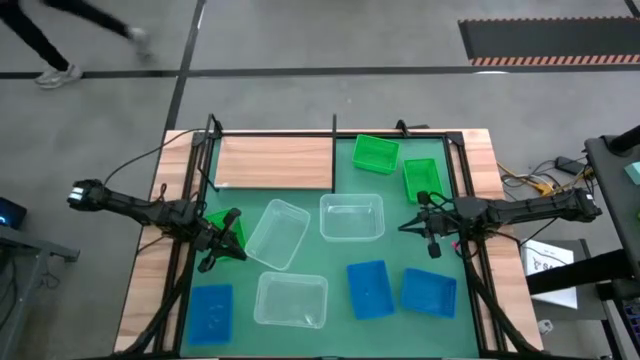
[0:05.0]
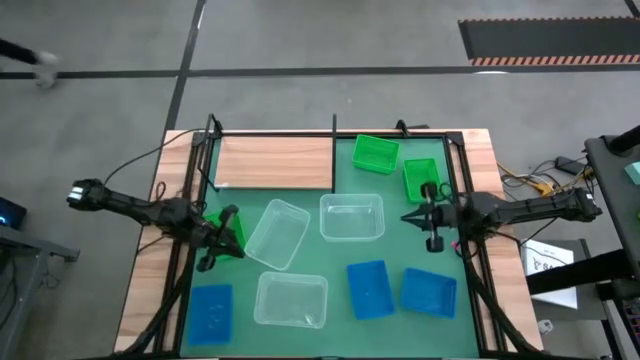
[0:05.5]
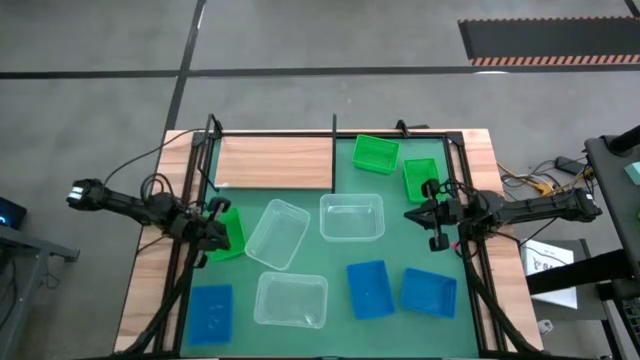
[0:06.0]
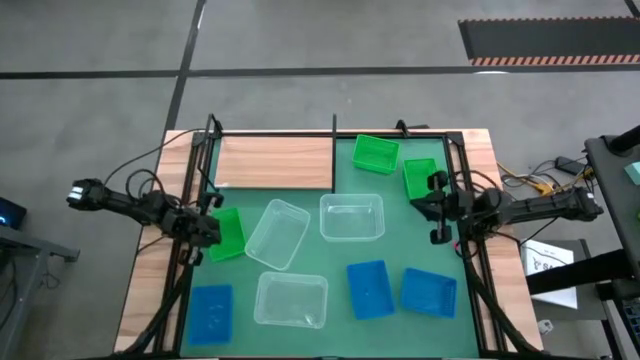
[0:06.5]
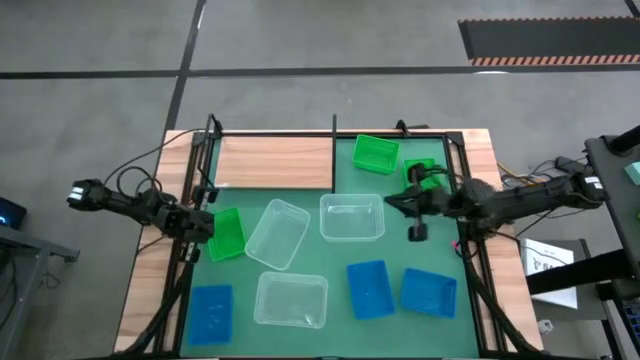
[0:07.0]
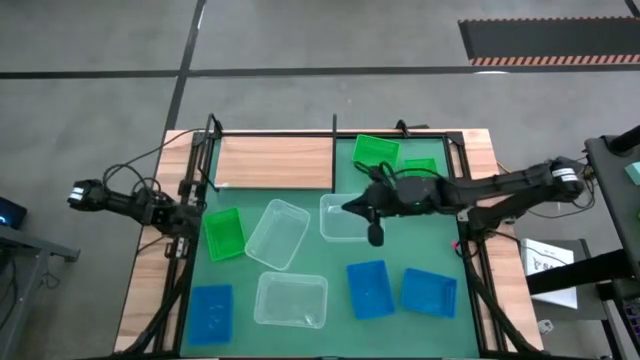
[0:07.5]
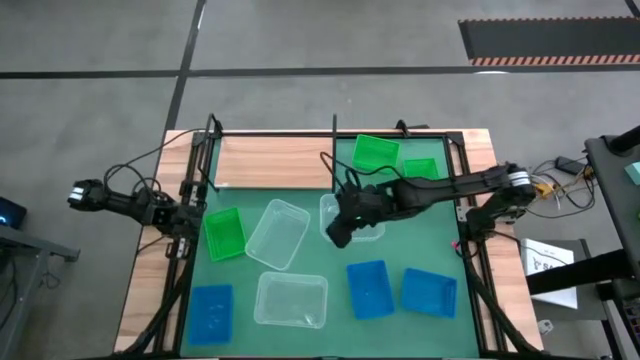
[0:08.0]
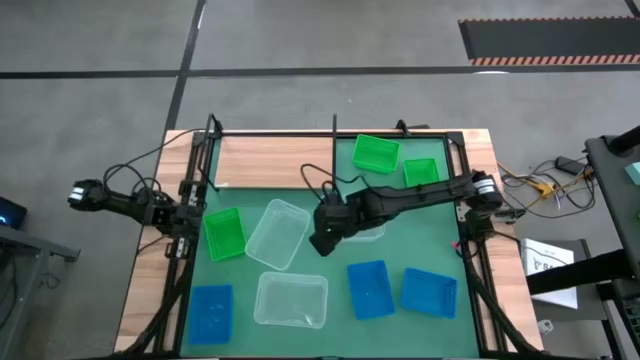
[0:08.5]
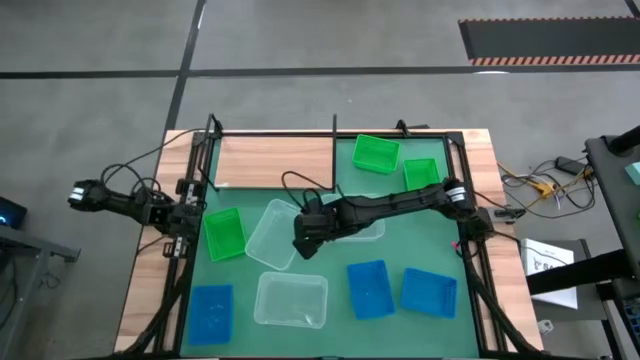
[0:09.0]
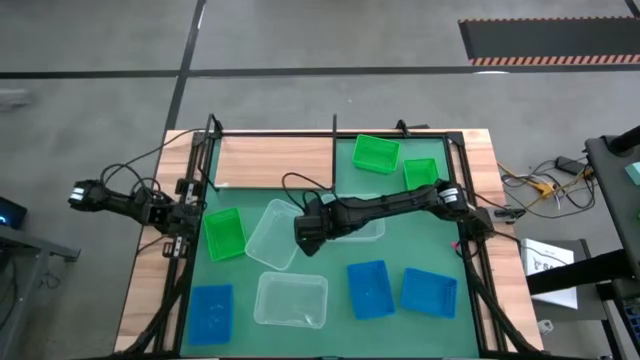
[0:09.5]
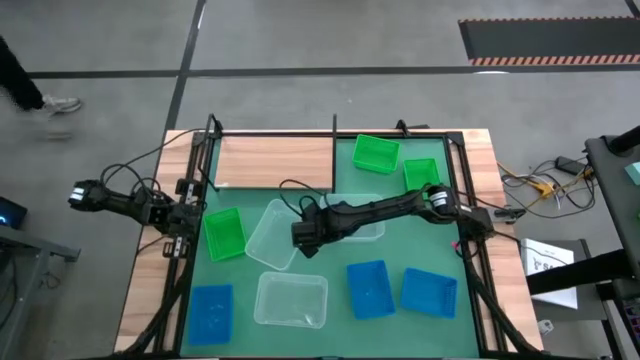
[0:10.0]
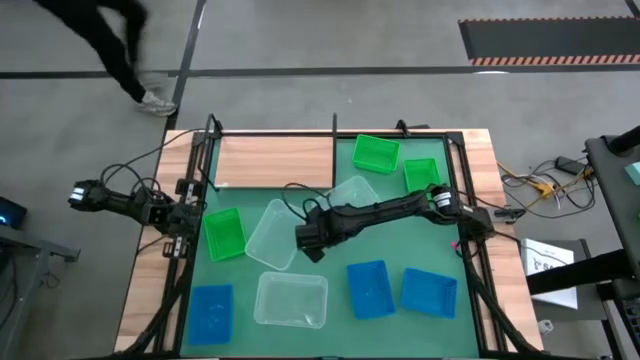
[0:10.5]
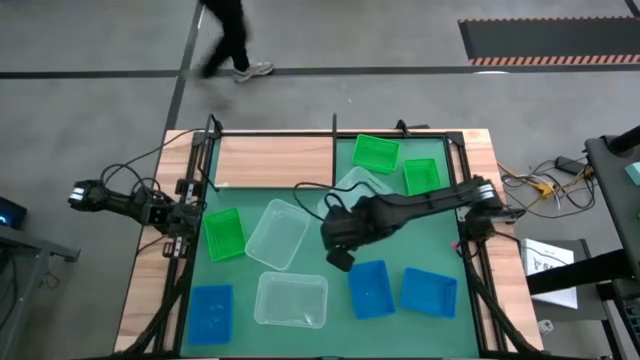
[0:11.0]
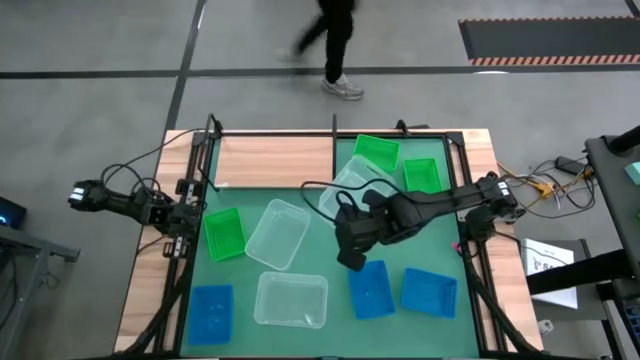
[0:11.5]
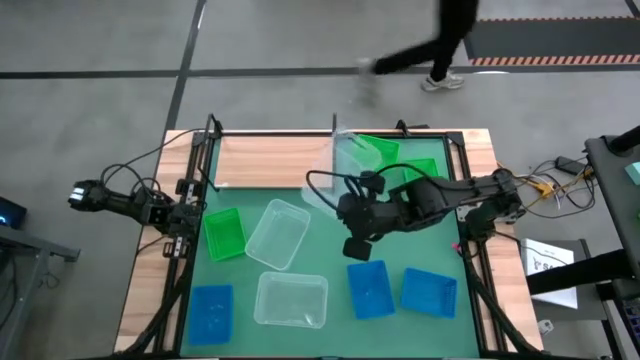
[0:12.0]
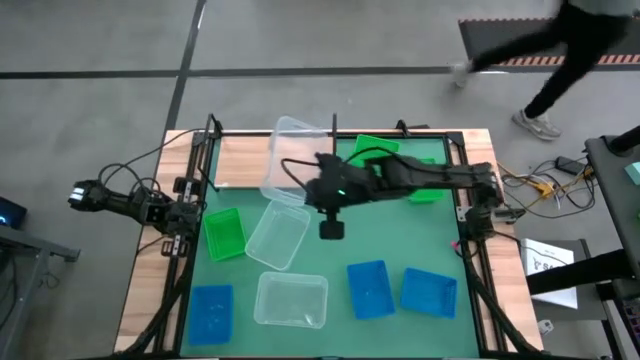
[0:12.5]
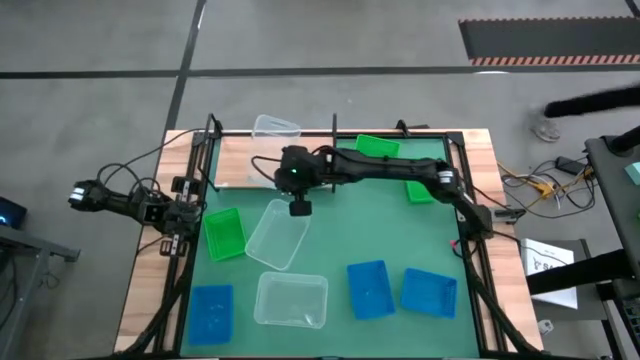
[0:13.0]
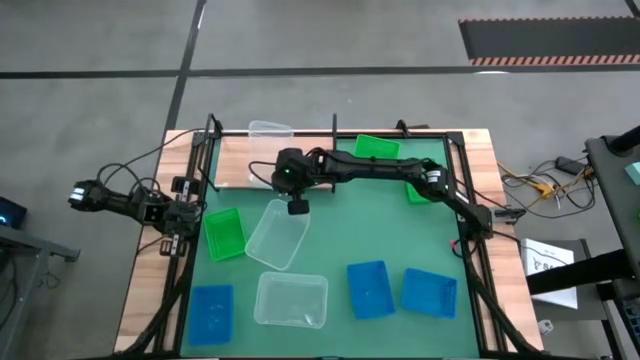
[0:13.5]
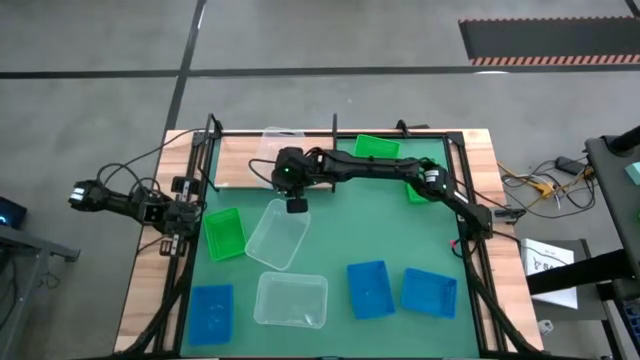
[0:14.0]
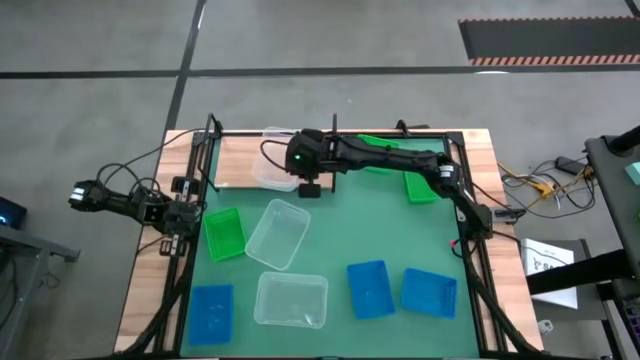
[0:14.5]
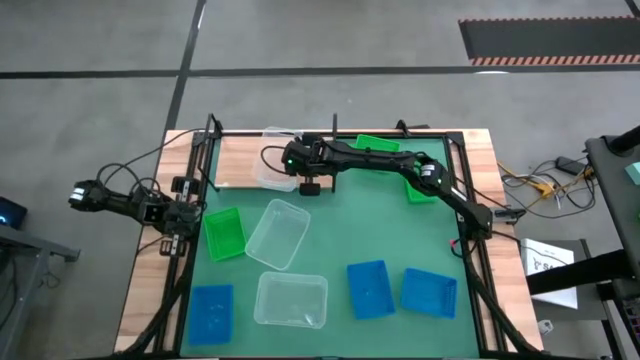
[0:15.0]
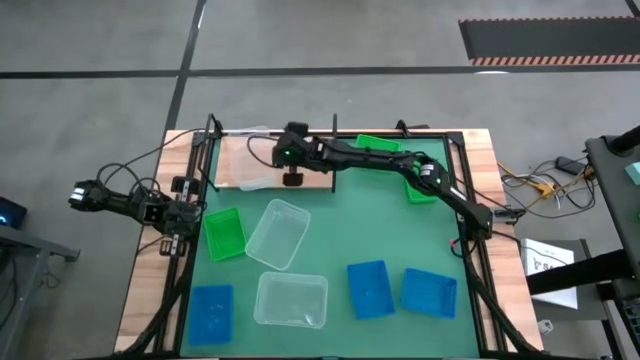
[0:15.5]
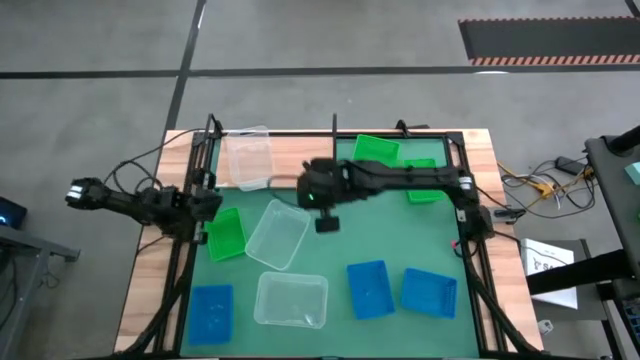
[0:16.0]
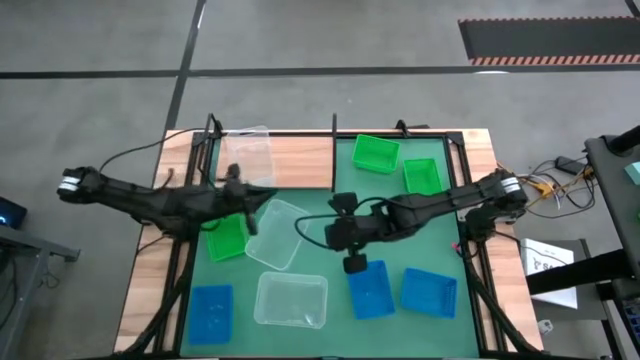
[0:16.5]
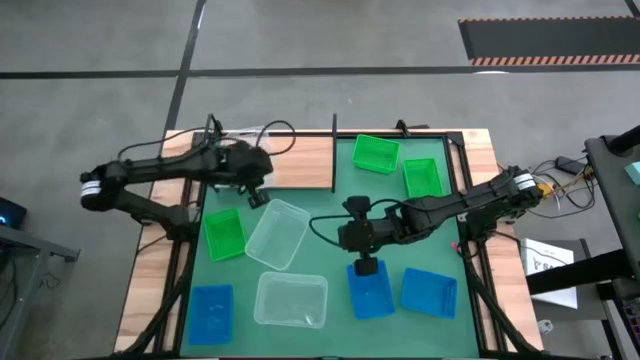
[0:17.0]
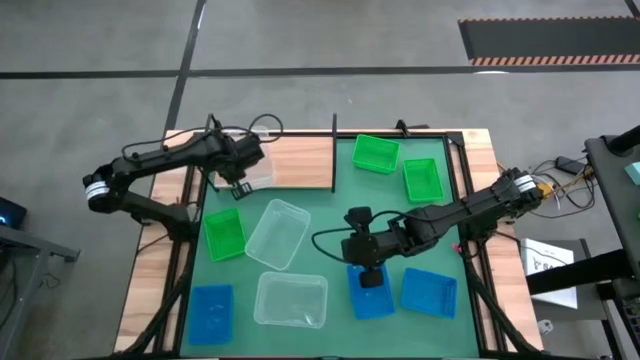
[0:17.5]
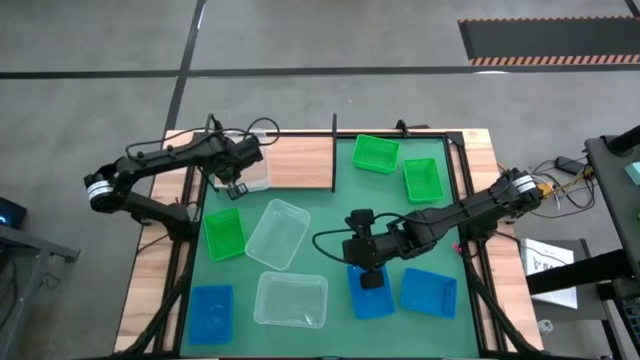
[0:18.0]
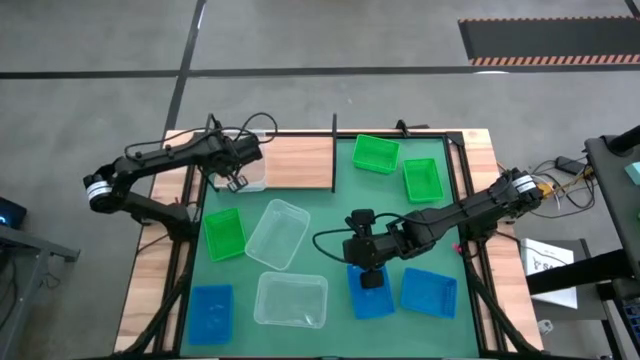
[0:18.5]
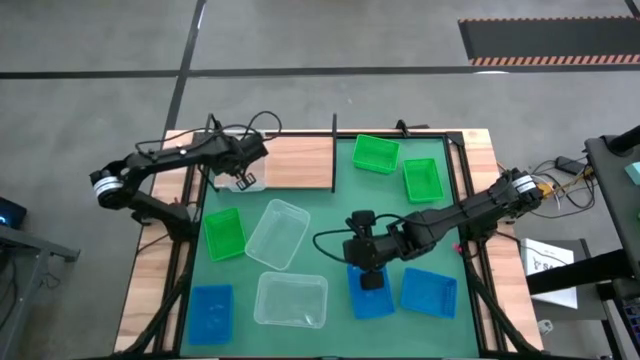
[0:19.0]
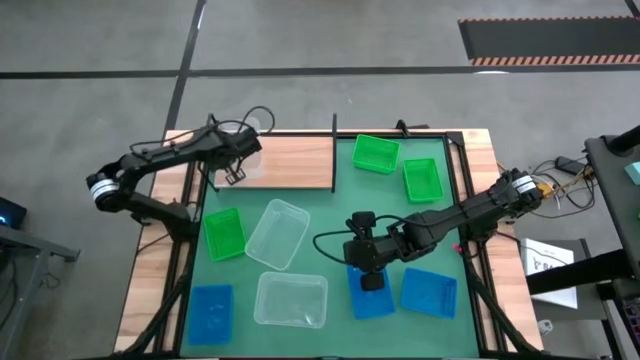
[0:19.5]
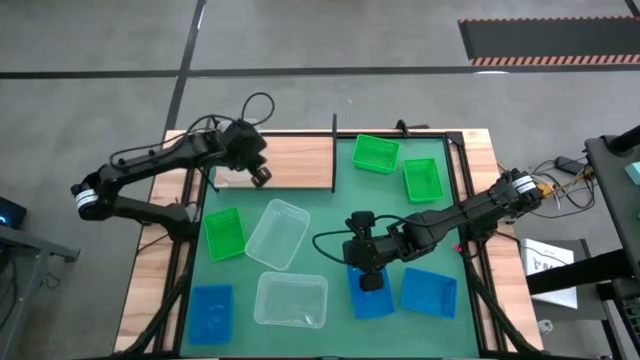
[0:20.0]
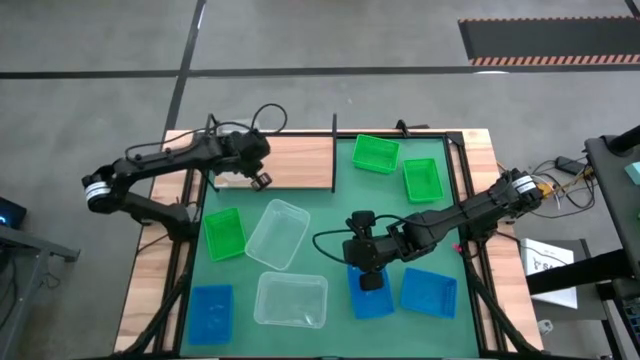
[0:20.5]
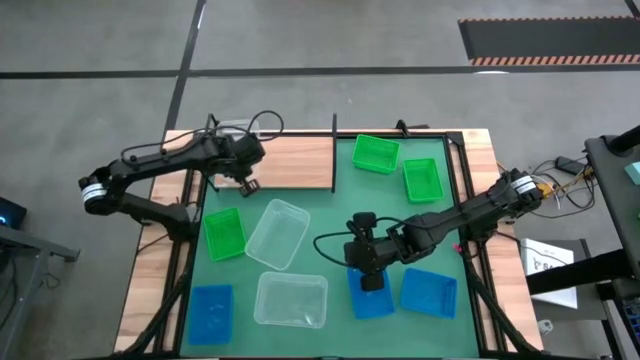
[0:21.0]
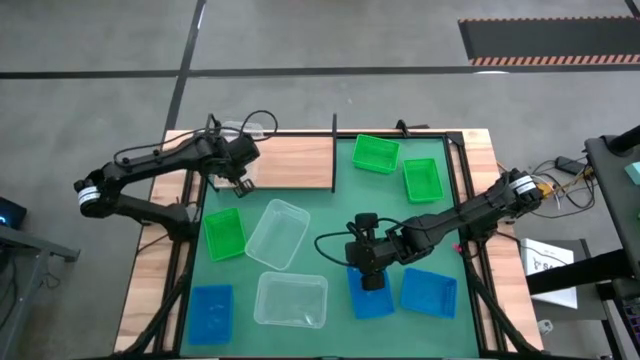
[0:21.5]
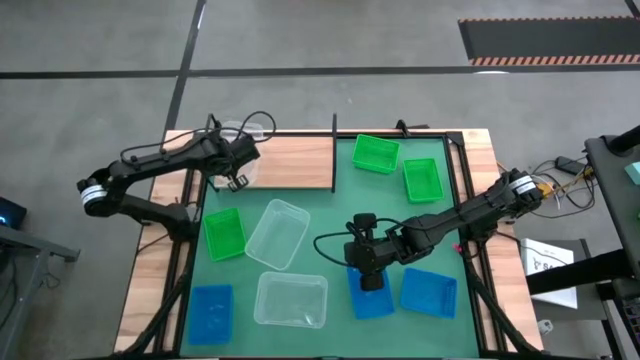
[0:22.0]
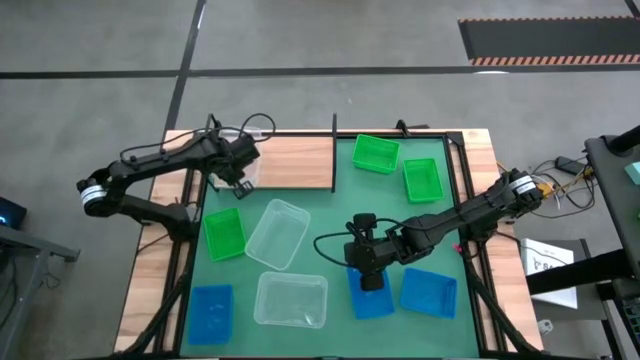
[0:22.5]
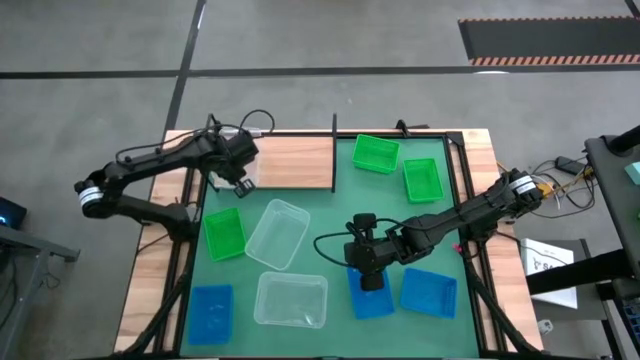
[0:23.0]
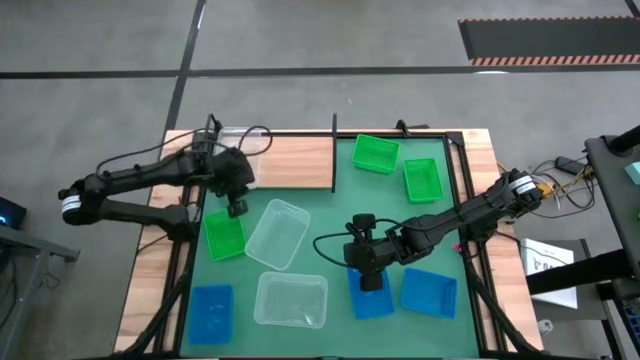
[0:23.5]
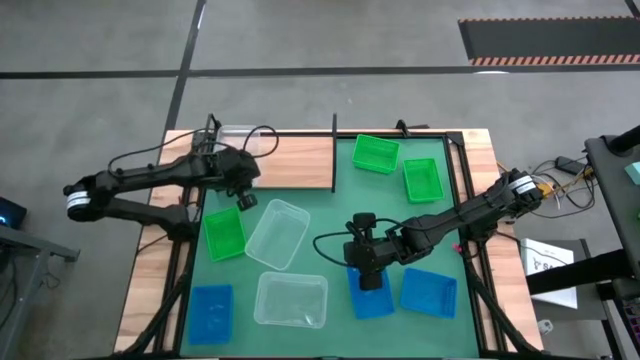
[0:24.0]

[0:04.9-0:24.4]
Task: Stack baskets on shelf by color
Put the top right transparent bin on the shelf
